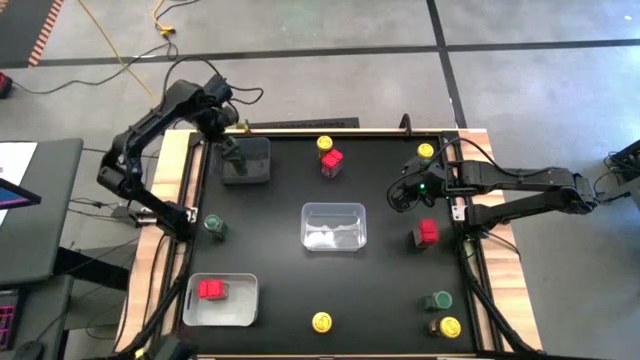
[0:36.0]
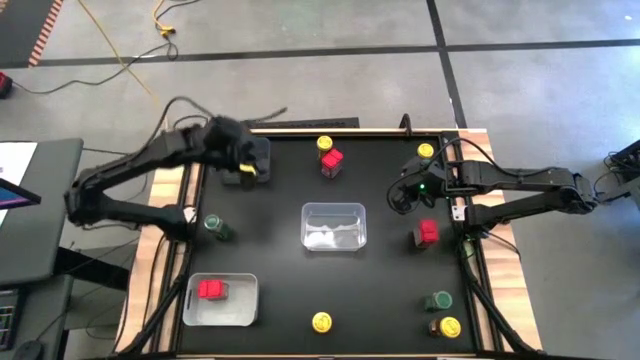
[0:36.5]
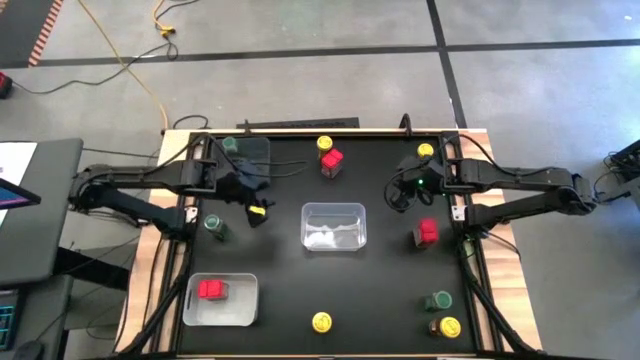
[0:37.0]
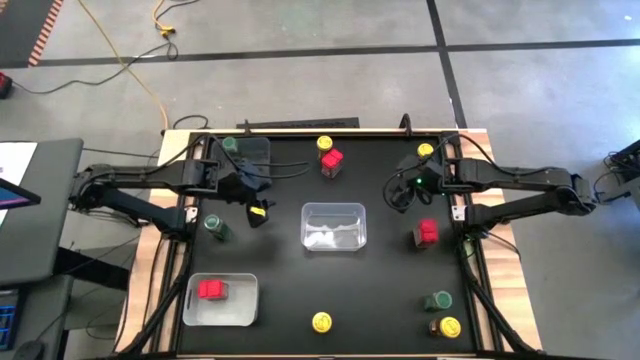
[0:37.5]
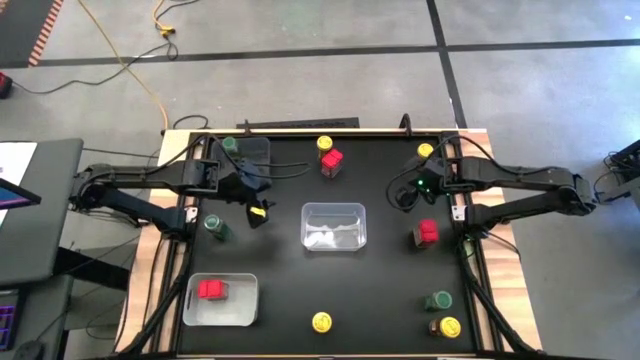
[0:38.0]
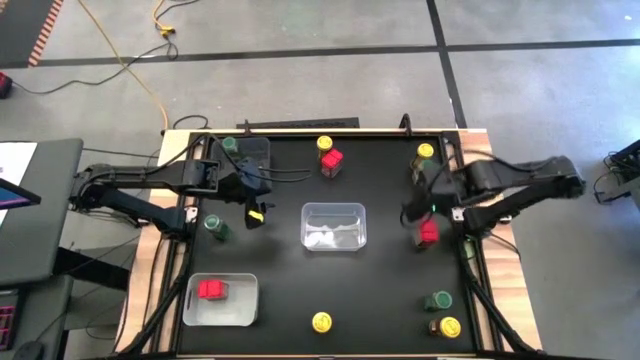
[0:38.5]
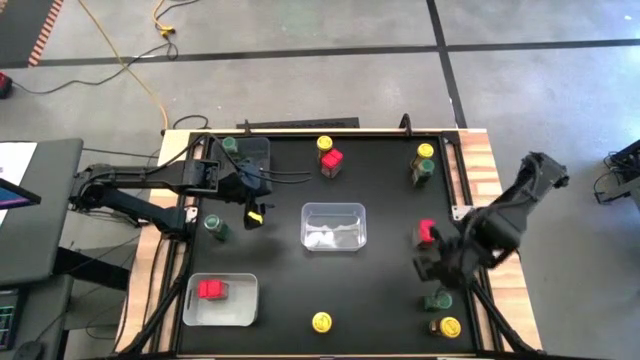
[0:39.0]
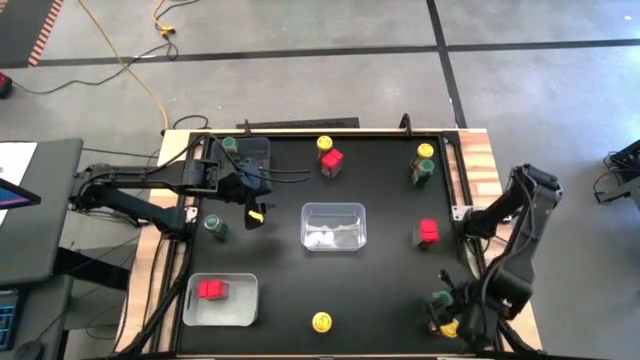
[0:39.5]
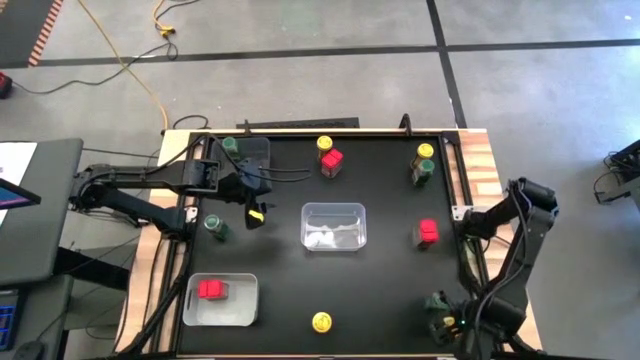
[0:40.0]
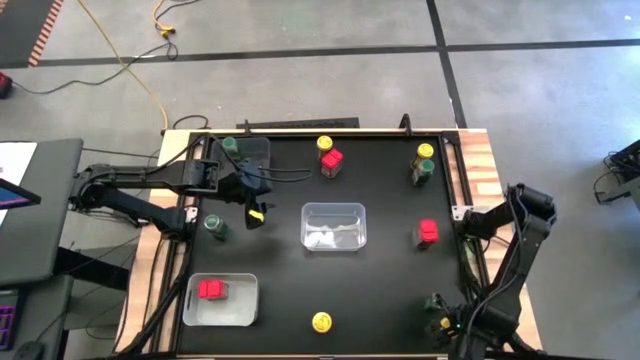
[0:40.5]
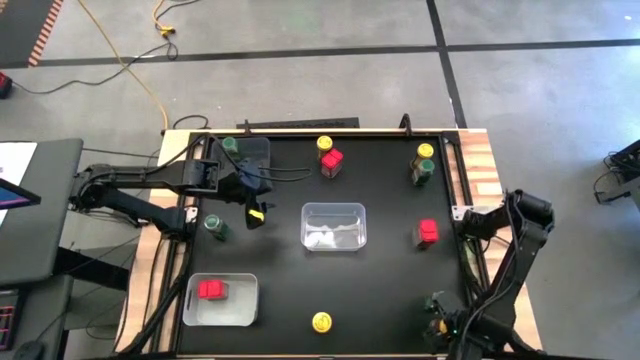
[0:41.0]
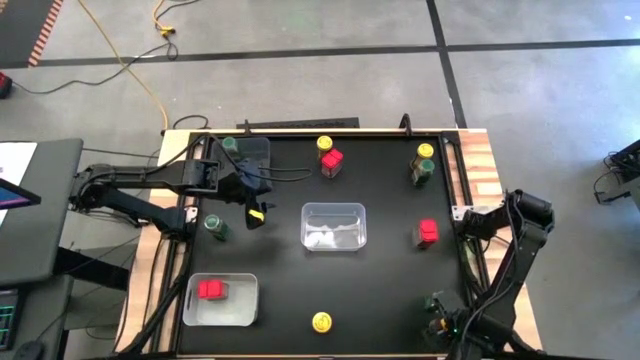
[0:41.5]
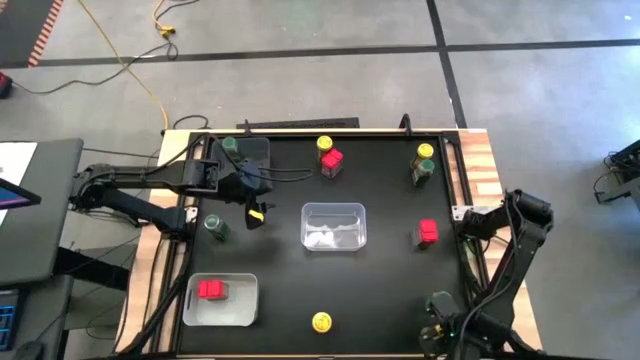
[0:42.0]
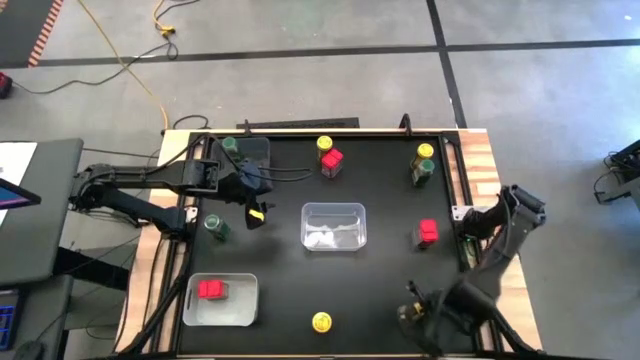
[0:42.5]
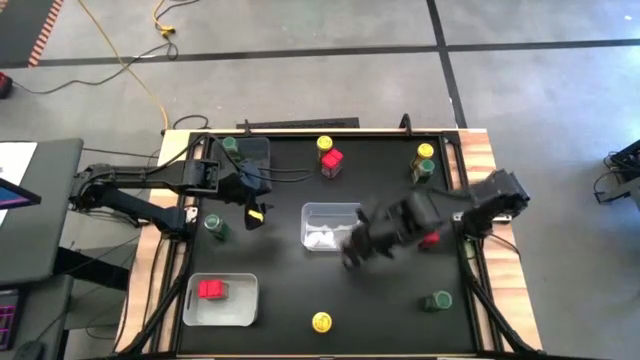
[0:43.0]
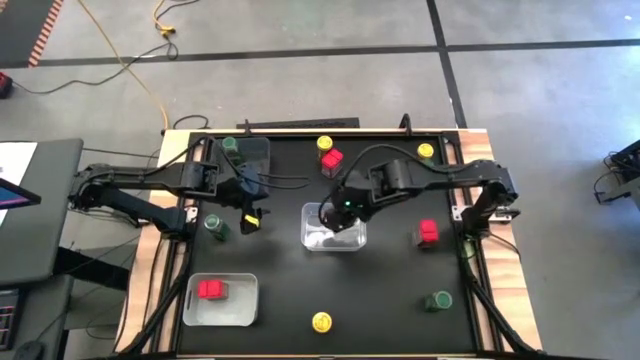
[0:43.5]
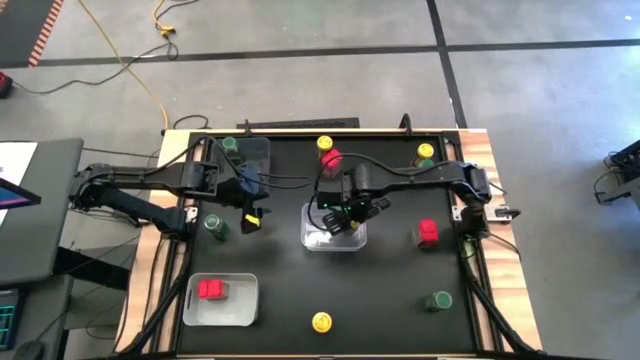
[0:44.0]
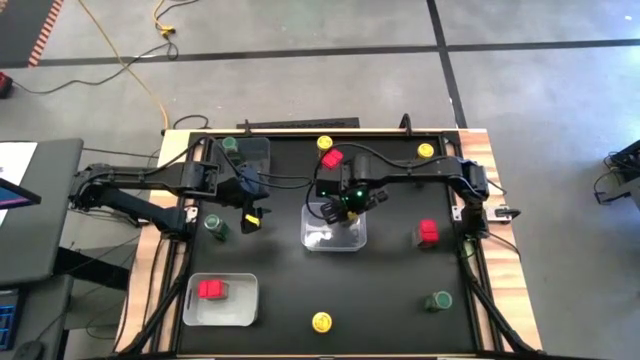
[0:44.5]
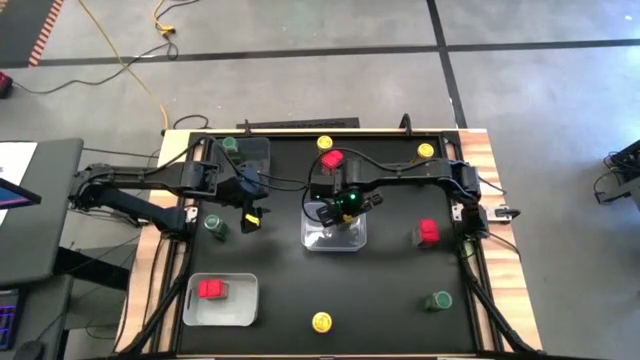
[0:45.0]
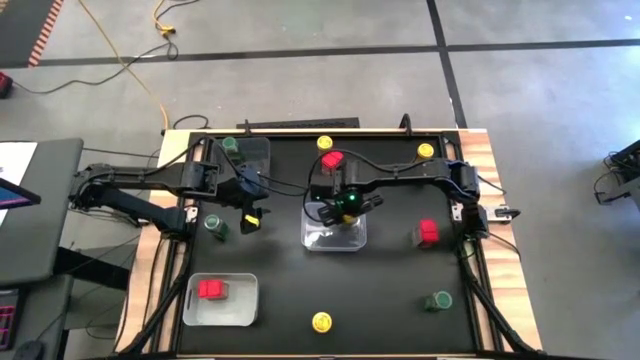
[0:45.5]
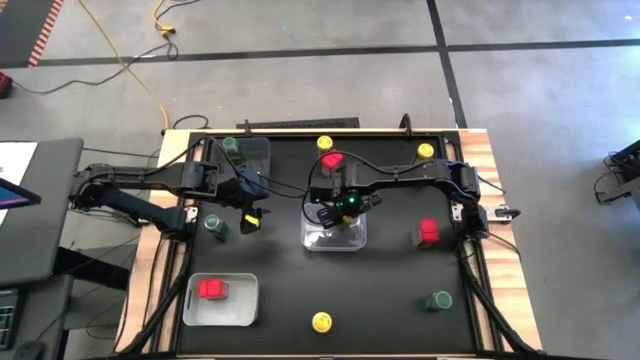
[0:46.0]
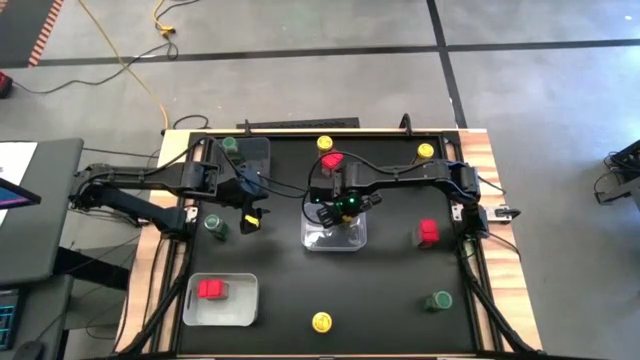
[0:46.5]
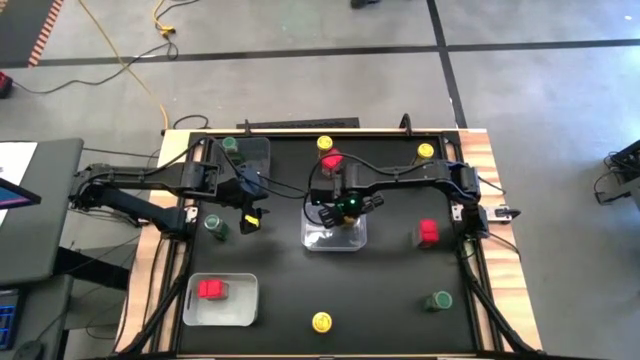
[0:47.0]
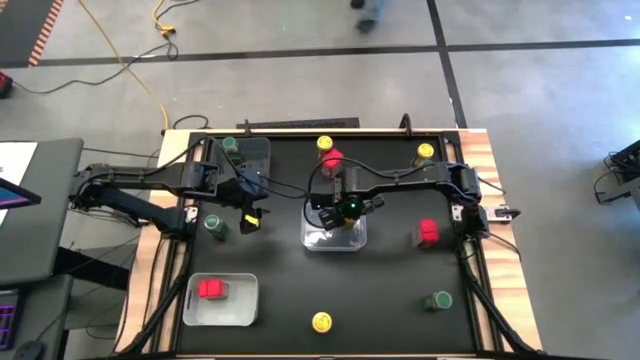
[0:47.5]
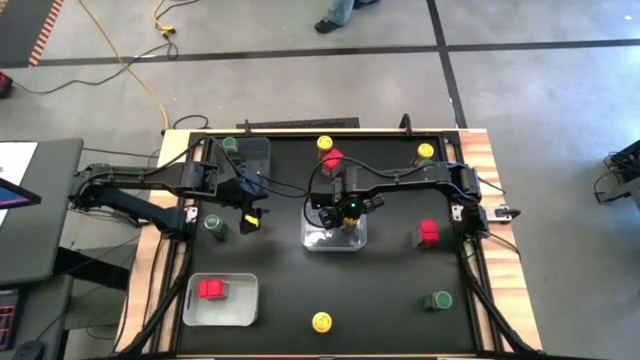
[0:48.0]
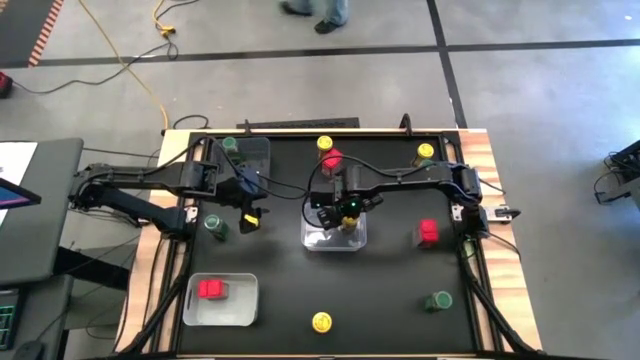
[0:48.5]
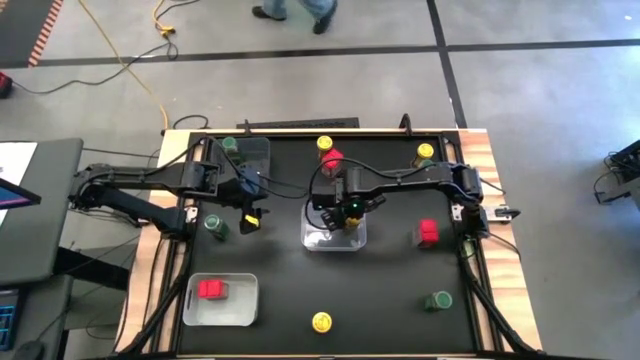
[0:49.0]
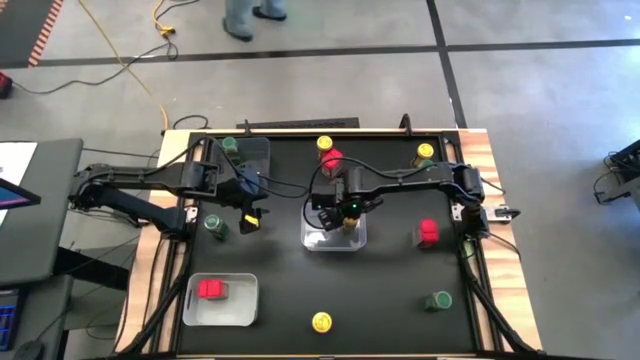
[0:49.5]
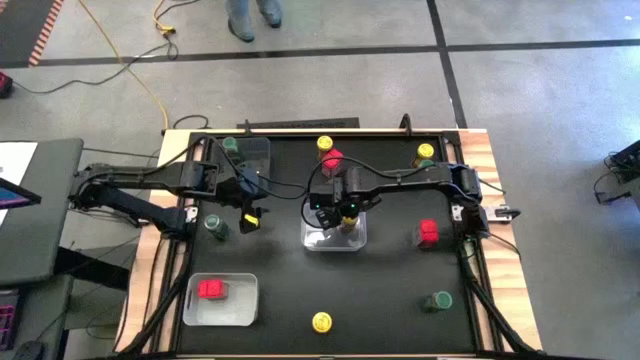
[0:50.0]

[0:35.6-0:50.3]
Task: Sort spices by type
Put the yellow seasoning bottle into the transparent bin

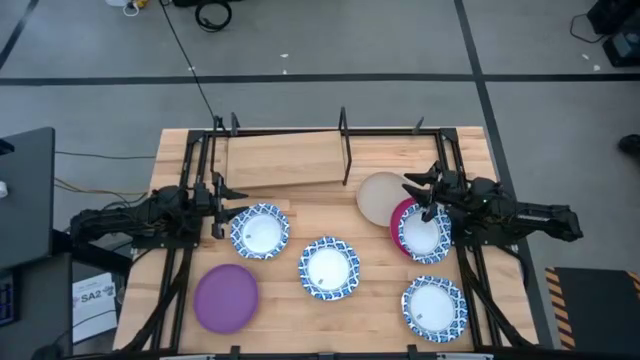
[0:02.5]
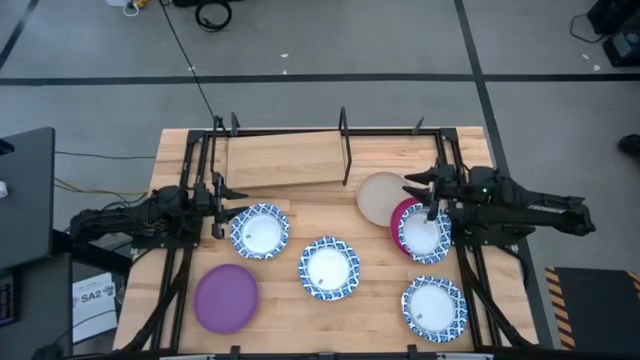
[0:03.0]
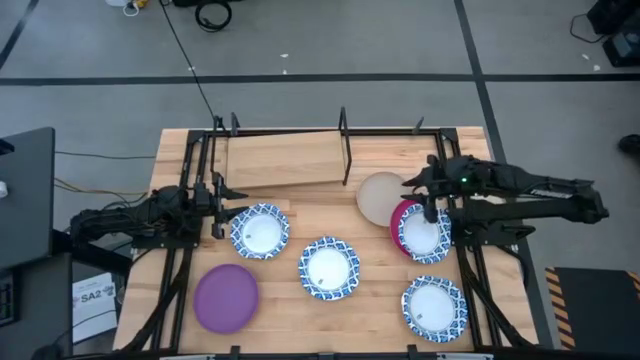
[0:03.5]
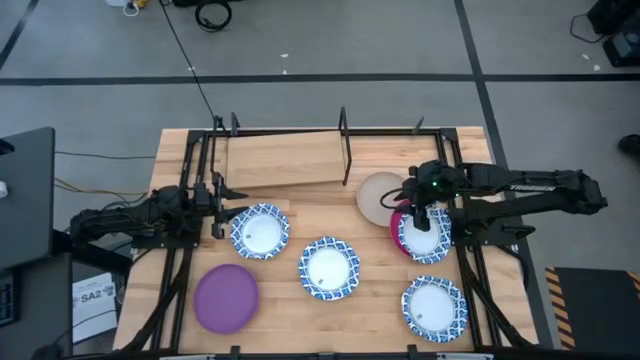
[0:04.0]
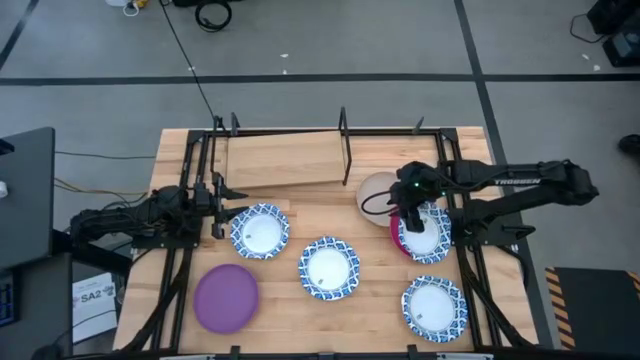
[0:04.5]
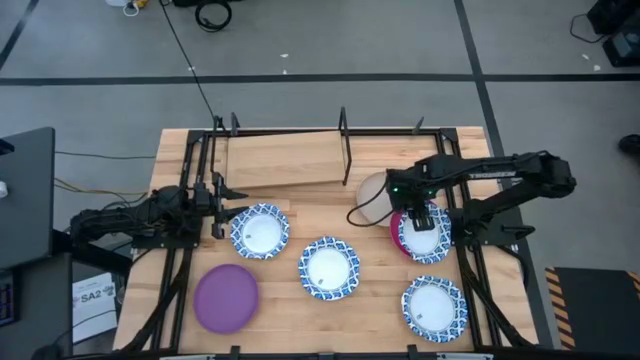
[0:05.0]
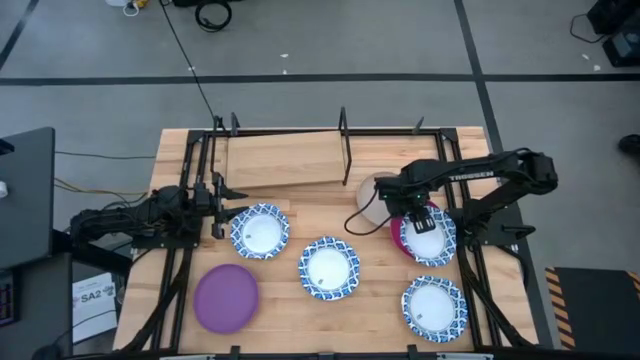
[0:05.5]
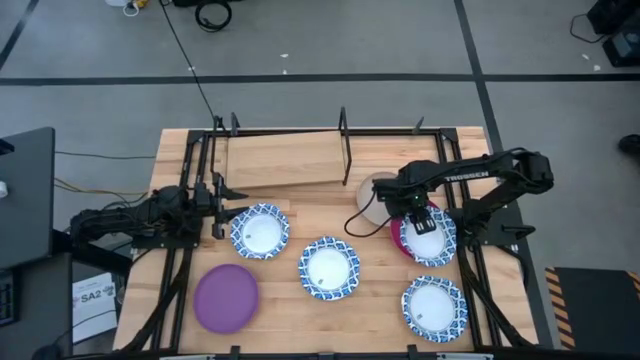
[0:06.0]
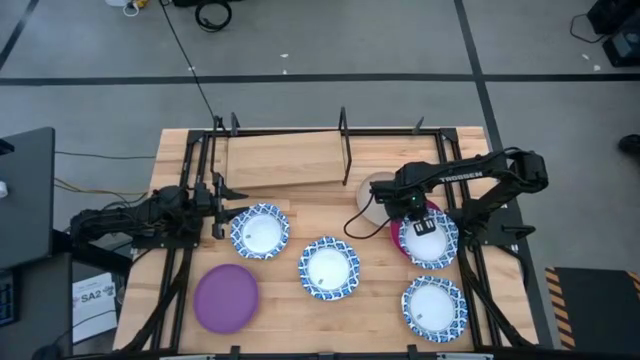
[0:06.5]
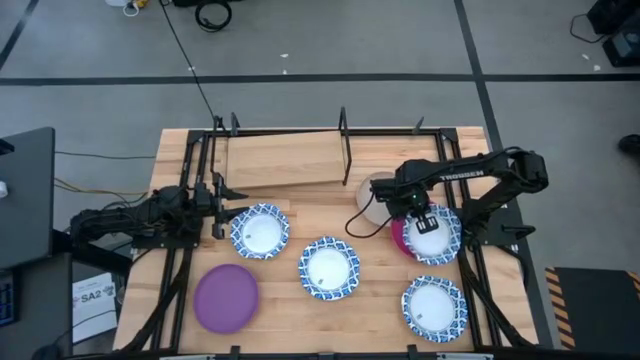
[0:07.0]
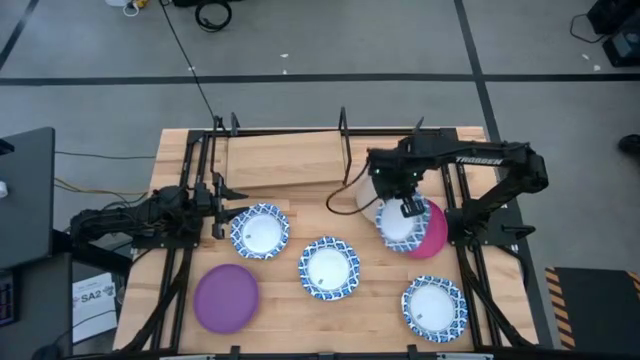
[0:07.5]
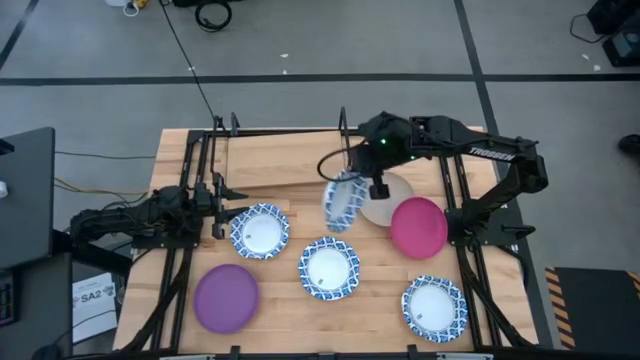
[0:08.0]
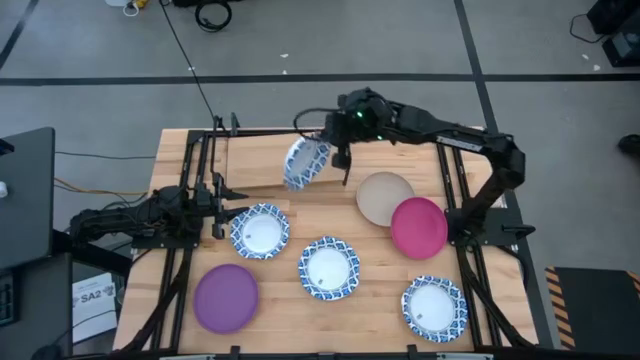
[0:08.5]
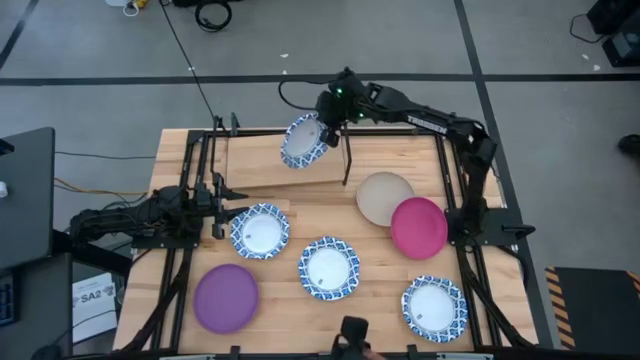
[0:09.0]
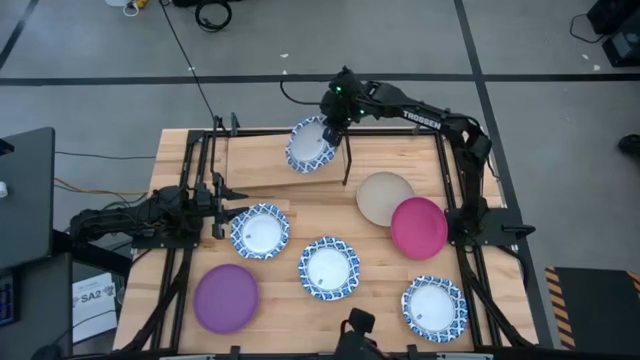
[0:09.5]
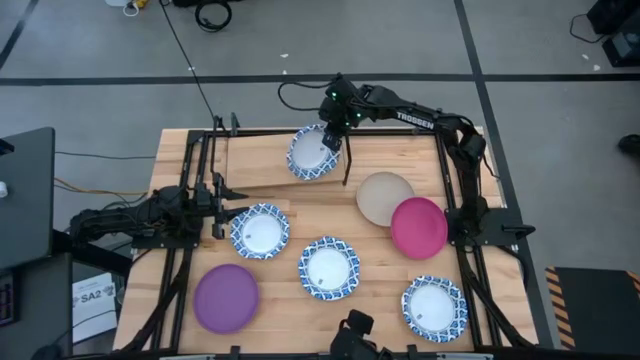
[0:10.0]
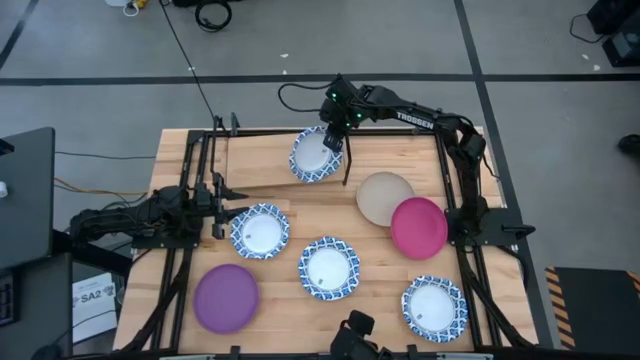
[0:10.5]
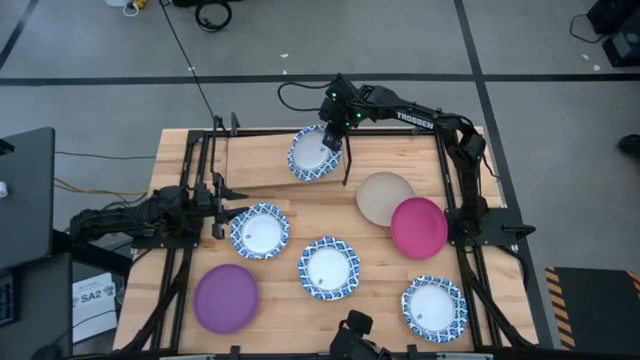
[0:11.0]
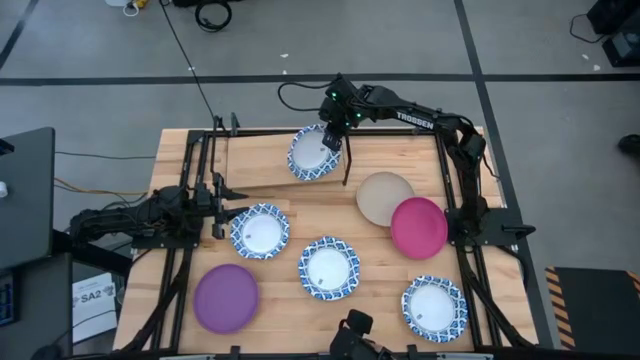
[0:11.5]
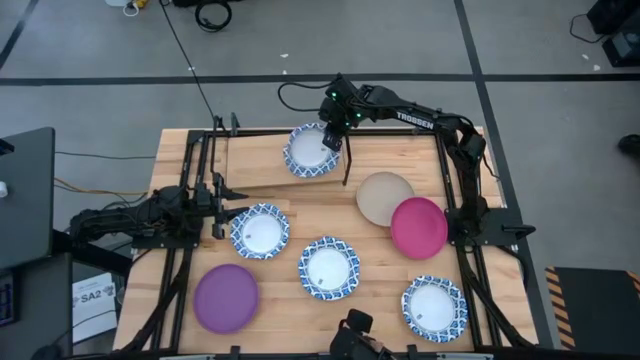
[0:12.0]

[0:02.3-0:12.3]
Task: Place and stack plates onto a shelf
Put the blue patterned bowl on the shelf
